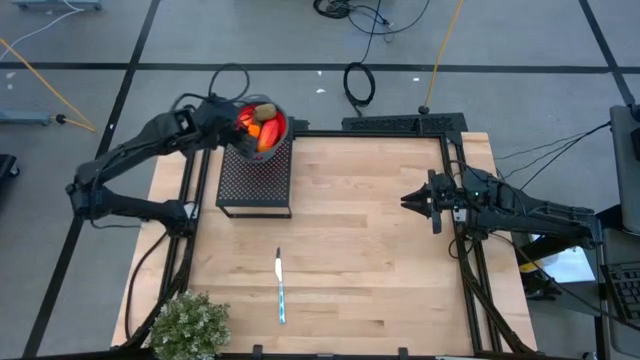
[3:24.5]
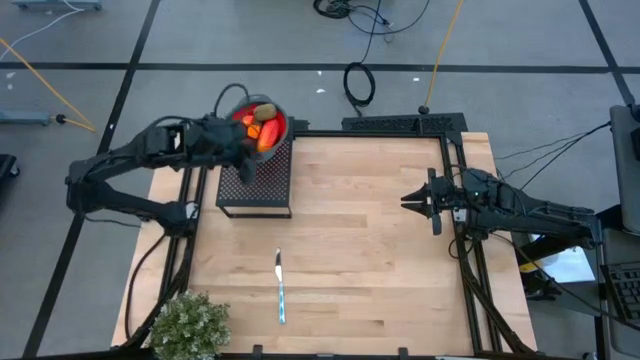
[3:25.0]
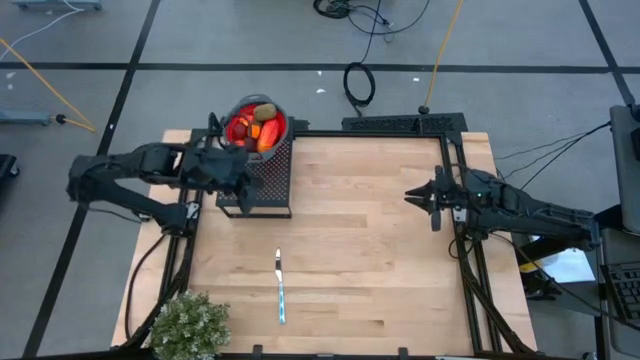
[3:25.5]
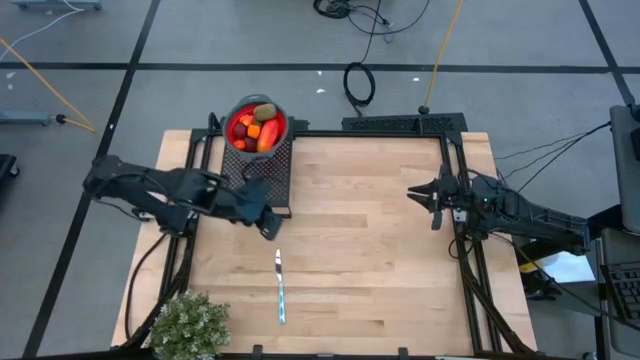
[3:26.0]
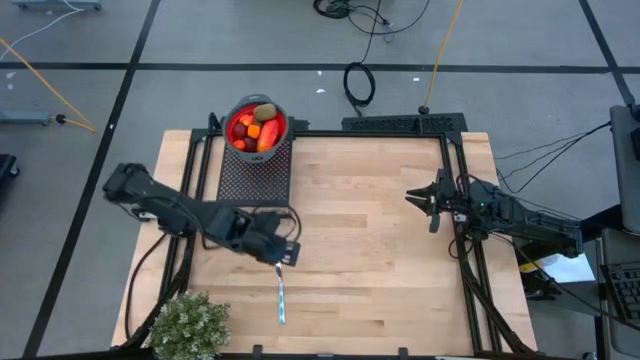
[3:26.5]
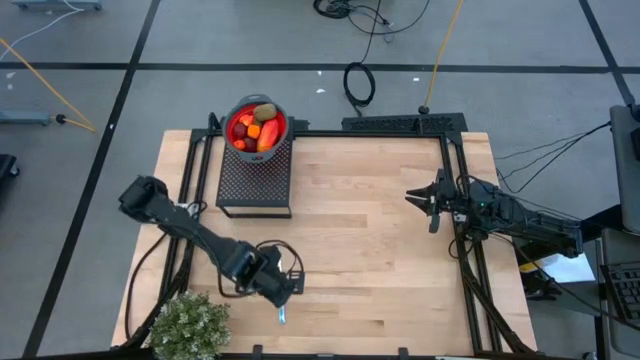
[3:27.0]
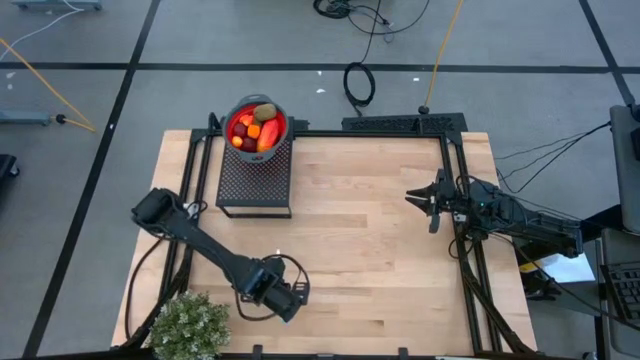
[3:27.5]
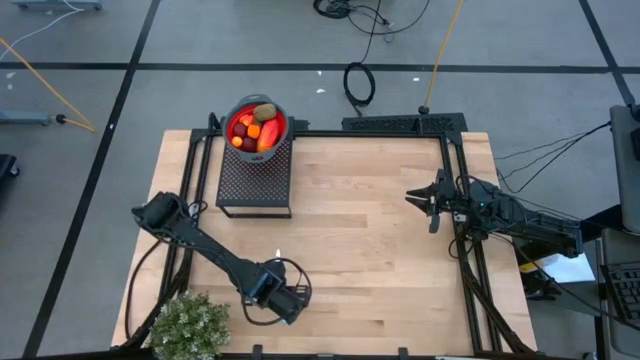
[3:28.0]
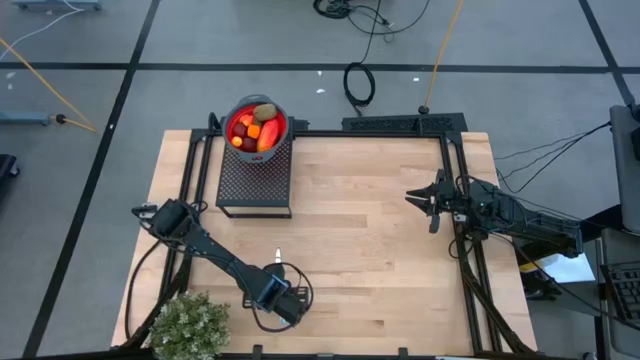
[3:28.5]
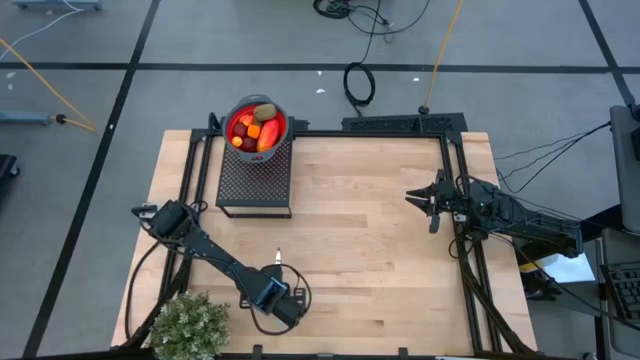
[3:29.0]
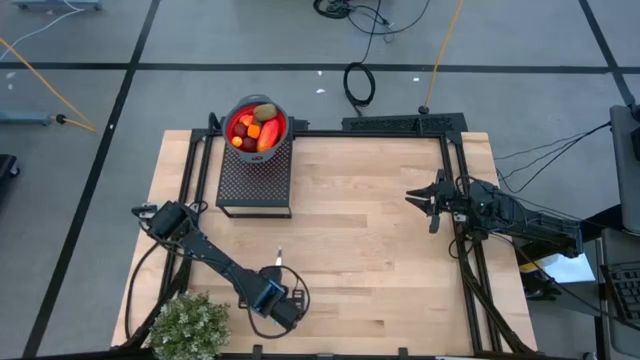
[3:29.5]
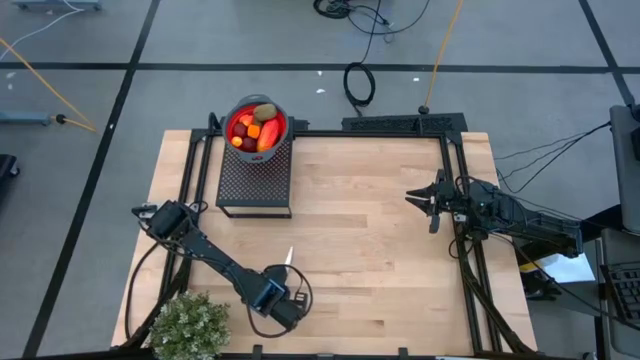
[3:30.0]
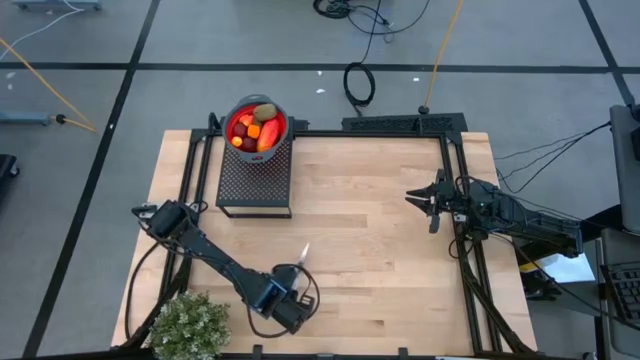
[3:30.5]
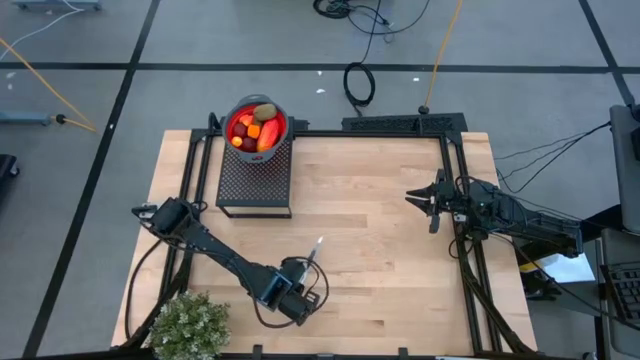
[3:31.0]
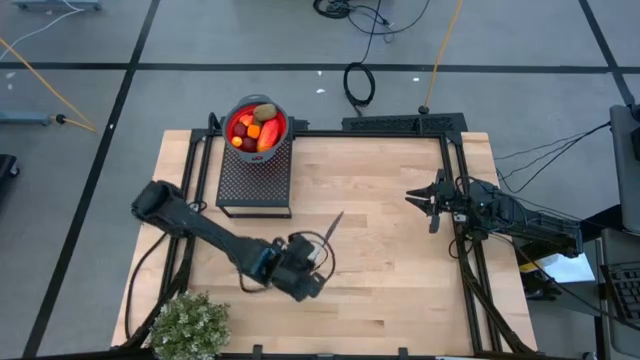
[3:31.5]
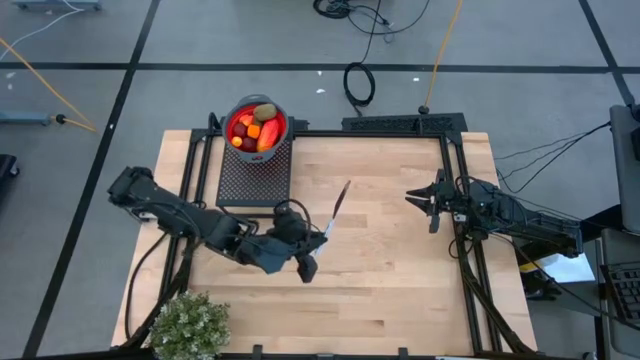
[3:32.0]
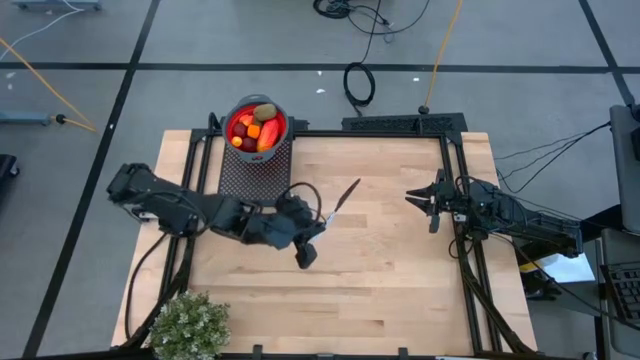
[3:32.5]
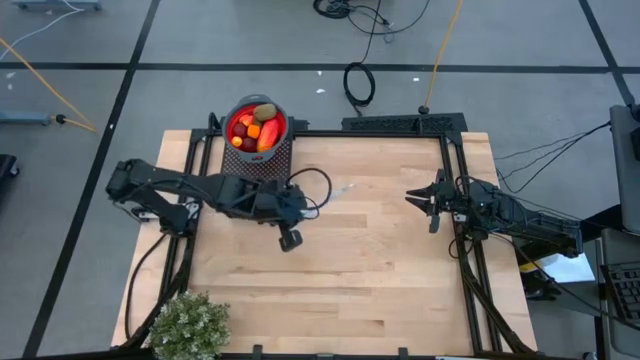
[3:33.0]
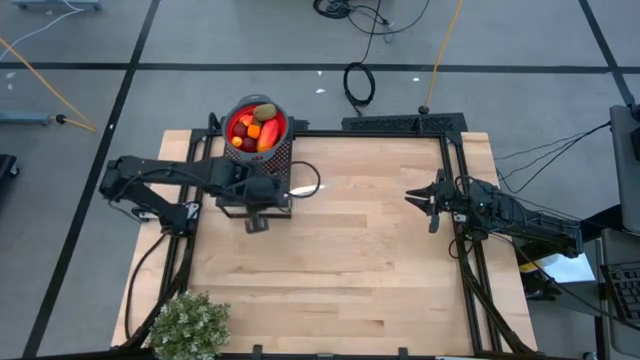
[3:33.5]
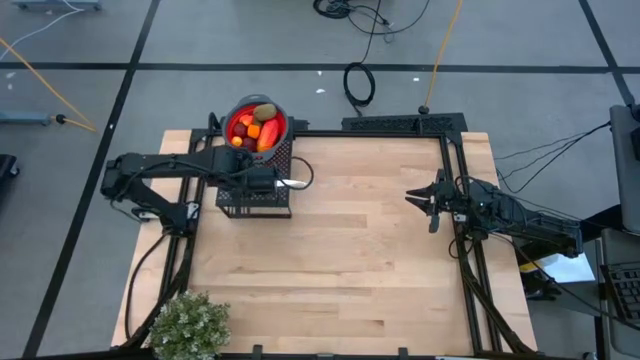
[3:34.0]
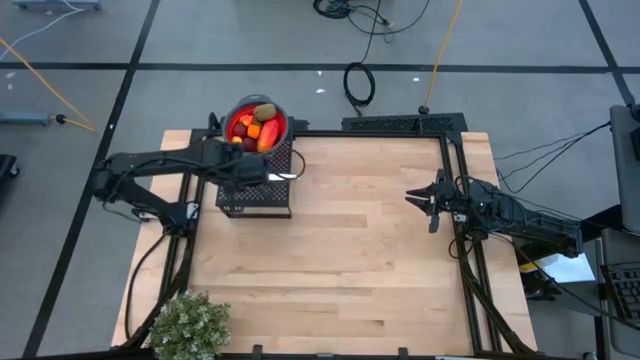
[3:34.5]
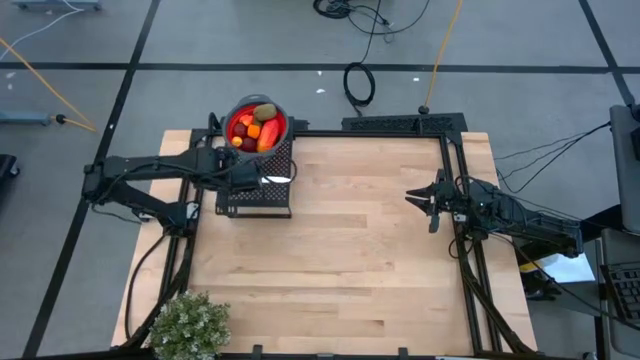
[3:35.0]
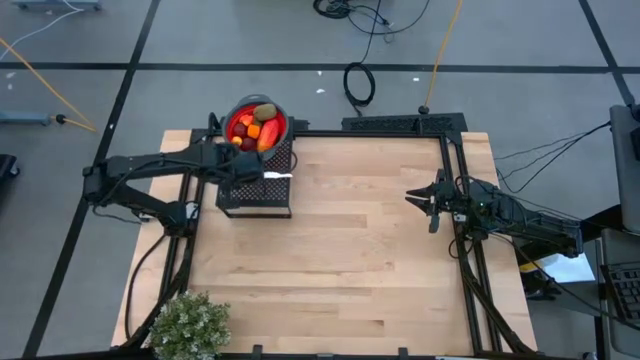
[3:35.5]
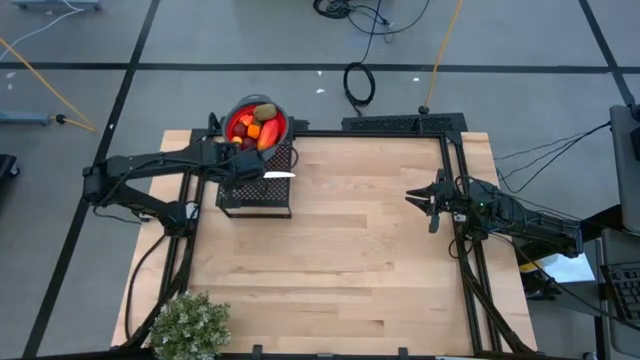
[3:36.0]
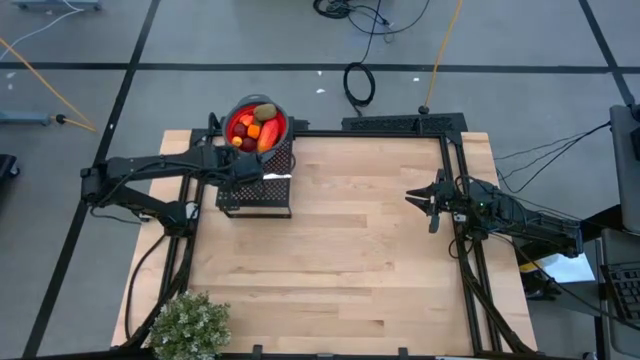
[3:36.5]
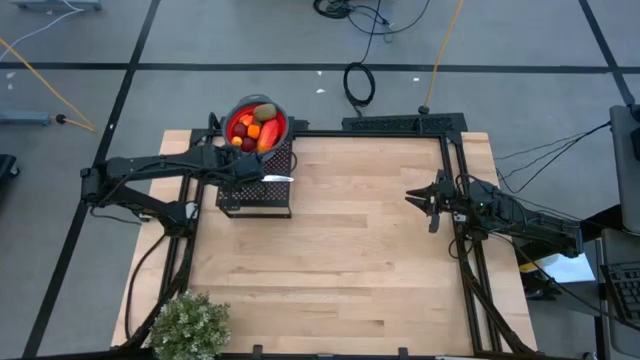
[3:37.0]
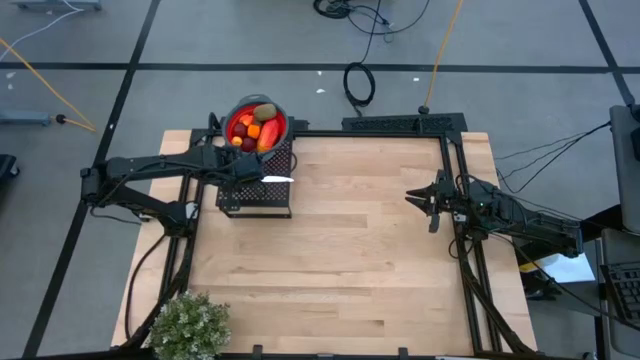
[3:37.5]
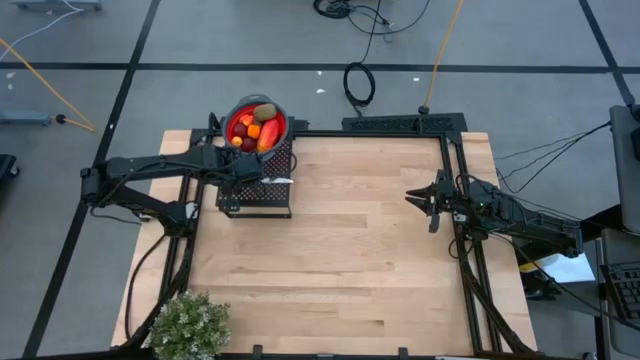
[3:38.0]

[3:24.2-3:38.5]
Task: Pick & Place Fruit
Put the knife on the shelf

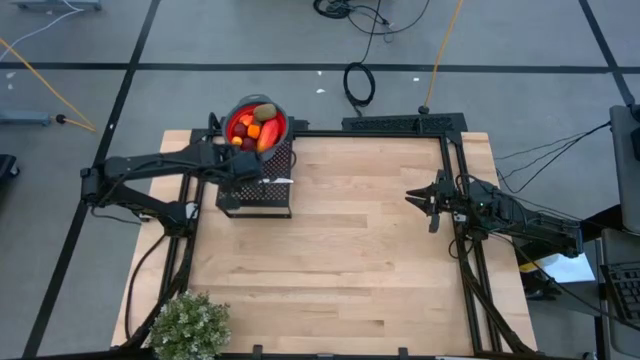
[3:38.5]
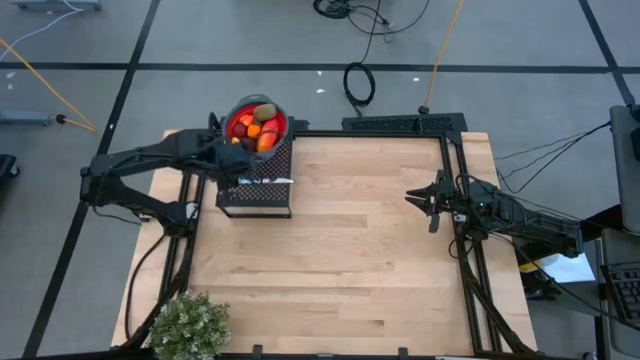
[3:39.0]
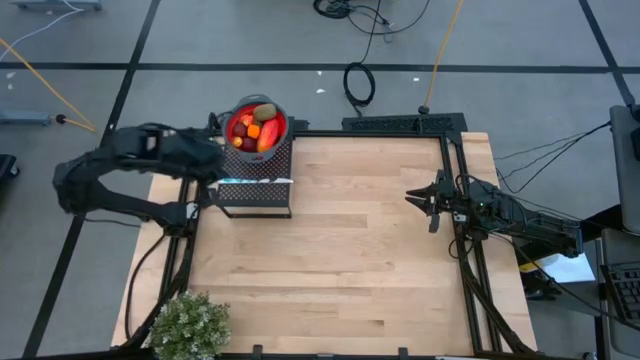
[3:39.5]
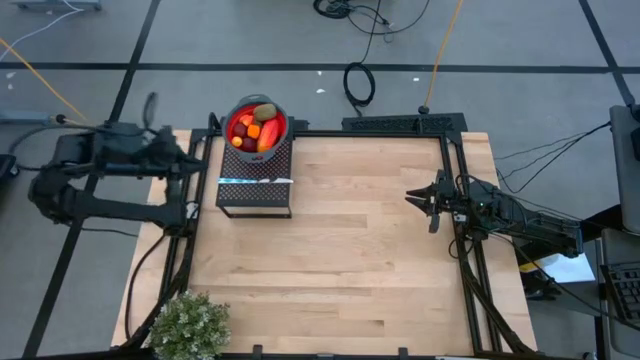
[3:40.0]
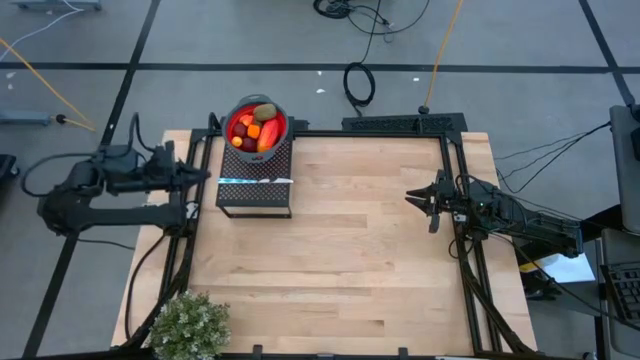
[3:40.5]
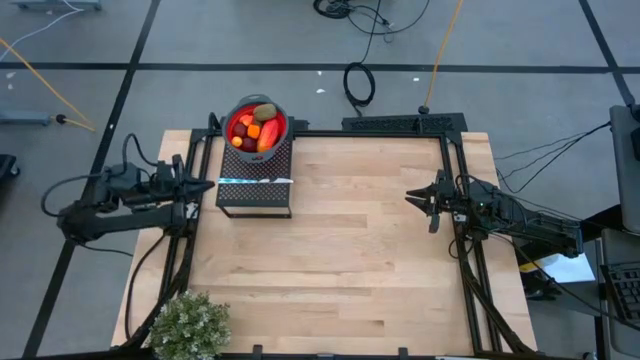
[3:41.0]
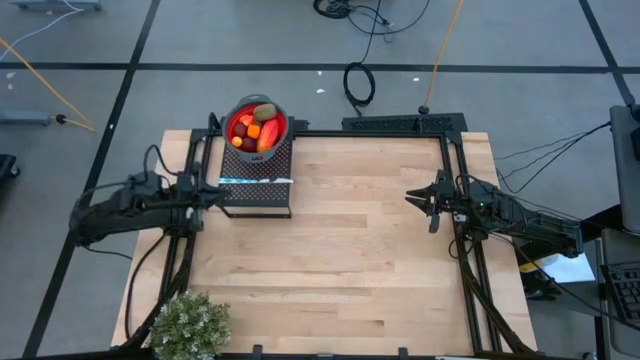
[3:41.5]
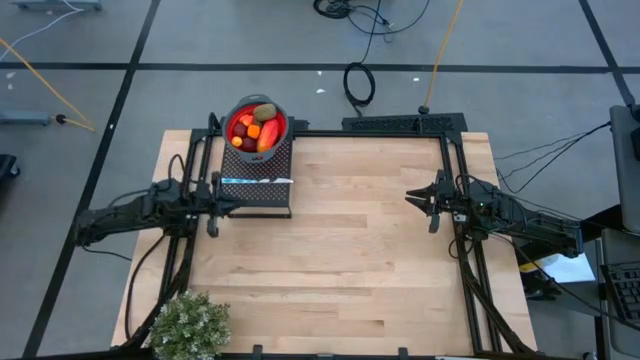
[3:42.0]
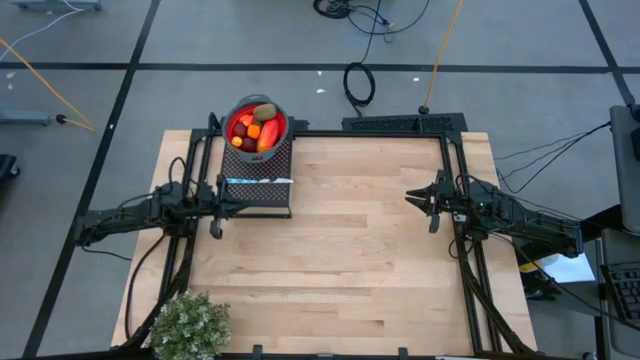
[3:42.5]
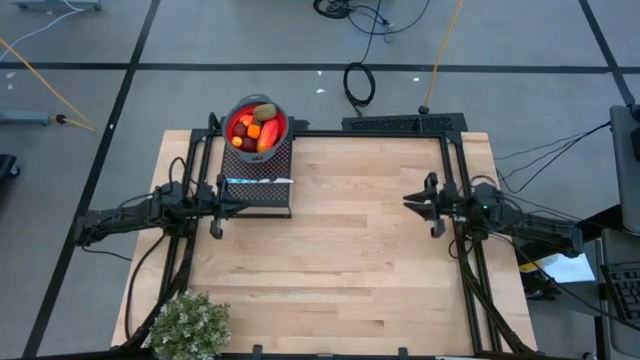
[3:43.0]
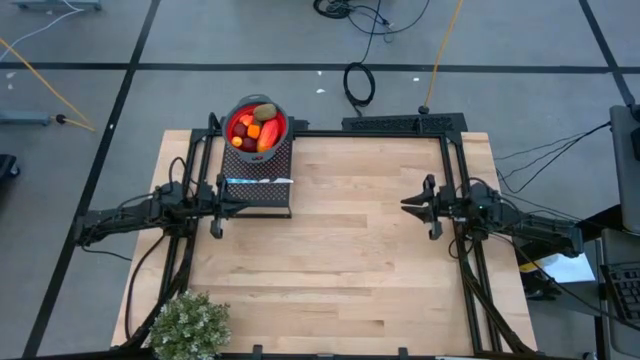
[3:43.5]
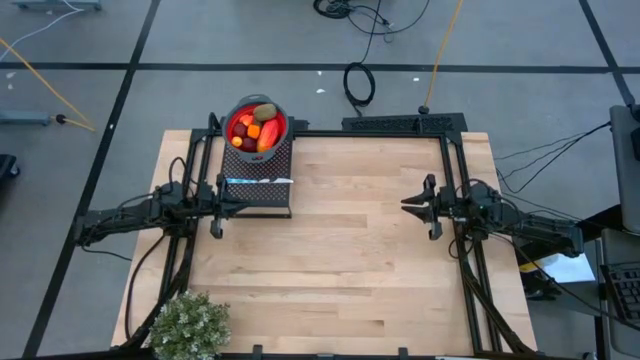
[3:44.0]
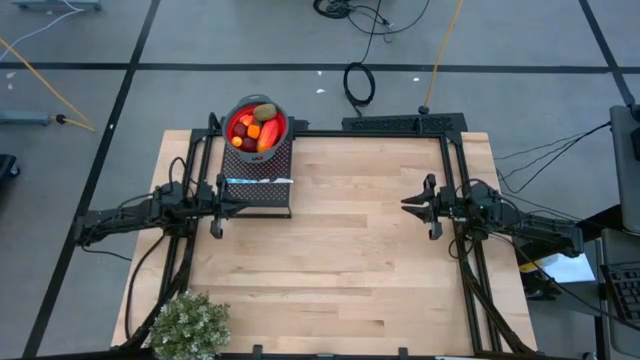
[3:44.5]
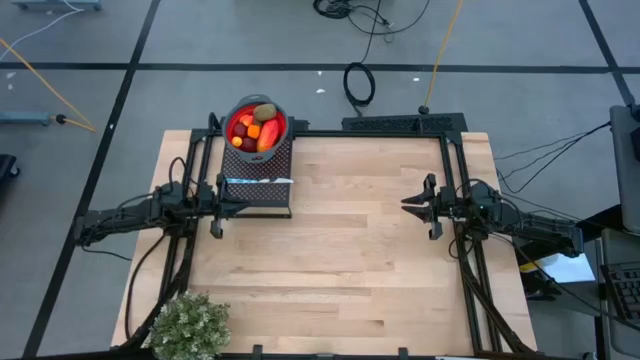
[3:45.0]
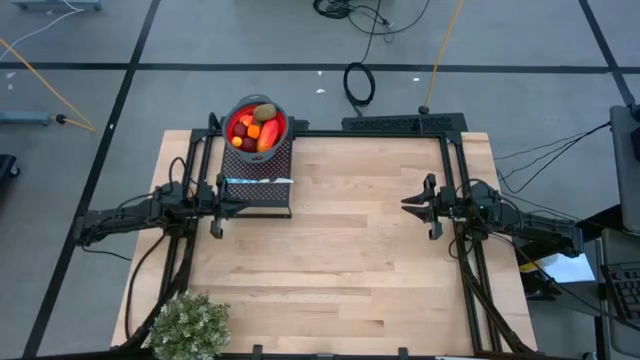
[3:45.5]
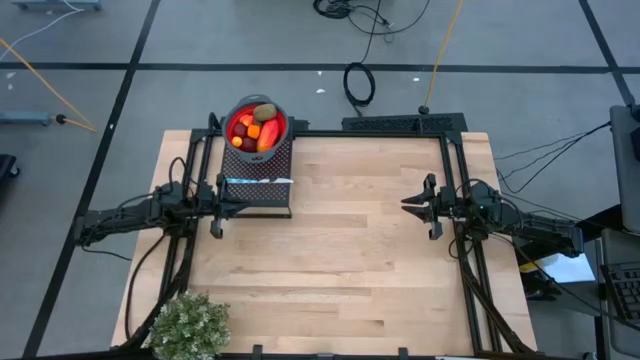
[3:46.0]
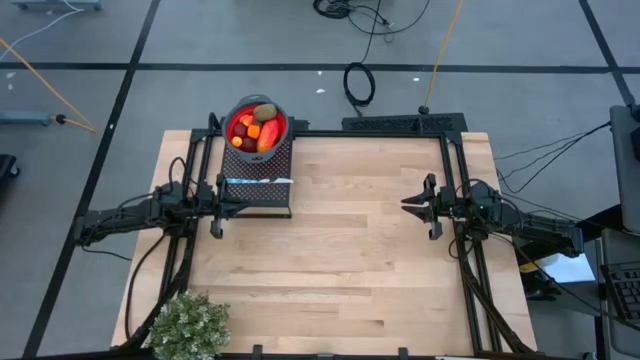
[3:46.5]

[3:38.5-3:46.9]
Return to Home Position

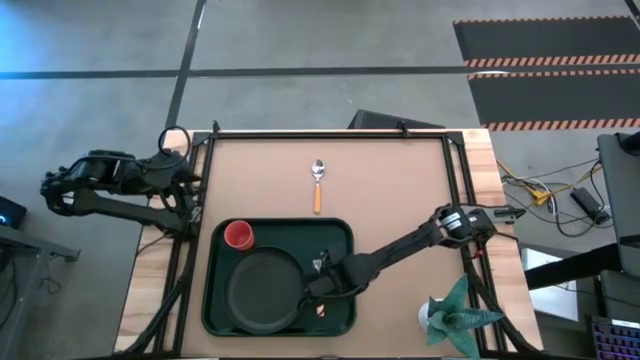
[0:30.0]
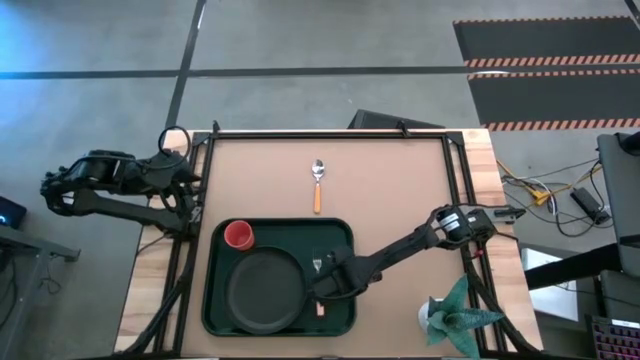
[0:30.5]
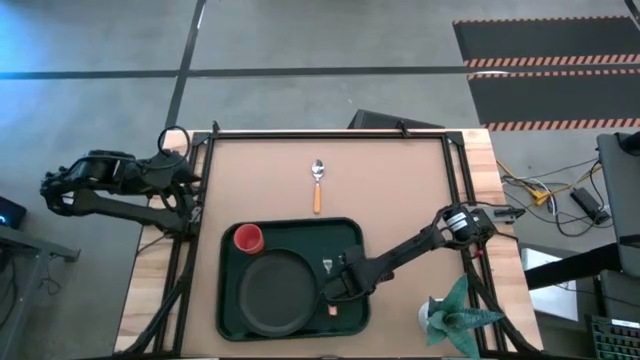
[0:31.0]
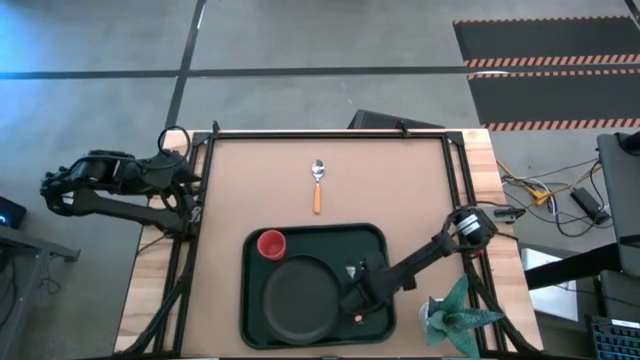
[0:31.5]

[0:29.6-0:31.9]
Task: Pick and place plate/cup/fork/spoon on tray
Move the green tray to the right of the table
